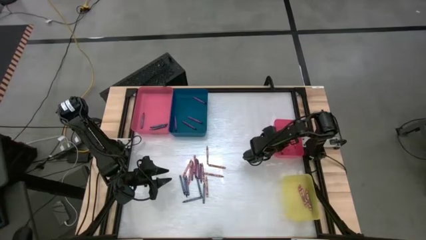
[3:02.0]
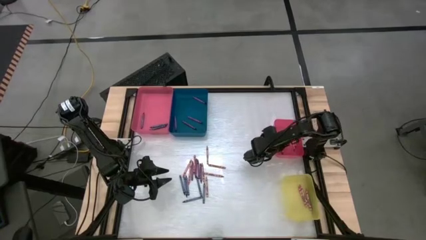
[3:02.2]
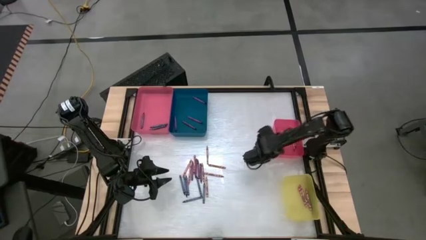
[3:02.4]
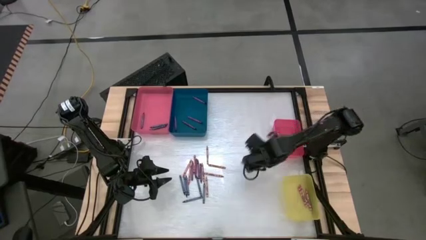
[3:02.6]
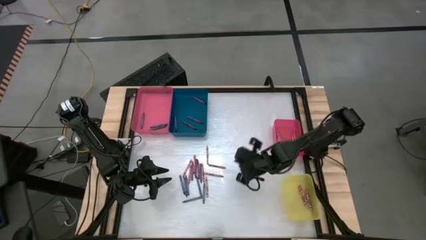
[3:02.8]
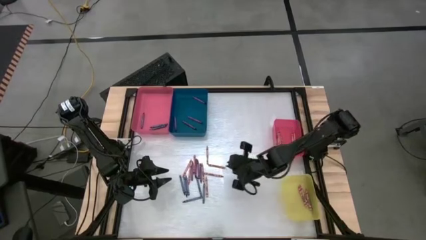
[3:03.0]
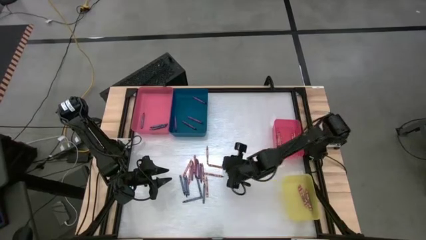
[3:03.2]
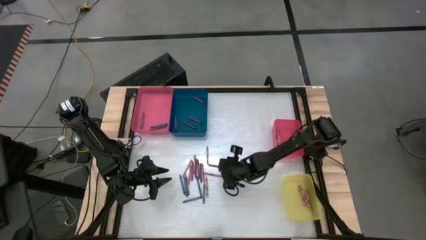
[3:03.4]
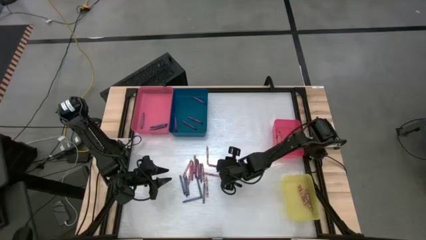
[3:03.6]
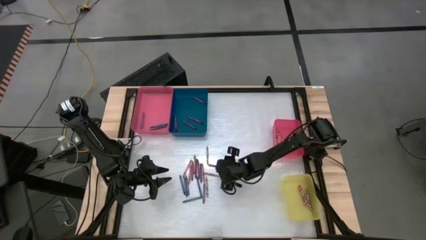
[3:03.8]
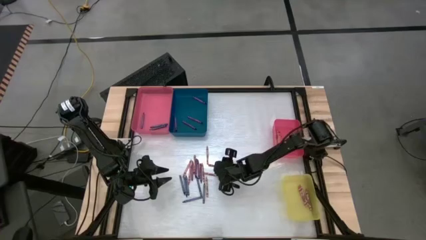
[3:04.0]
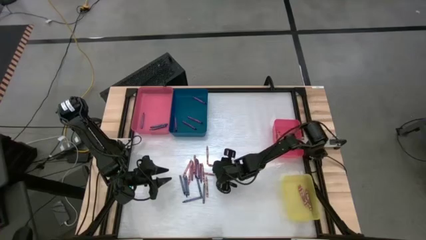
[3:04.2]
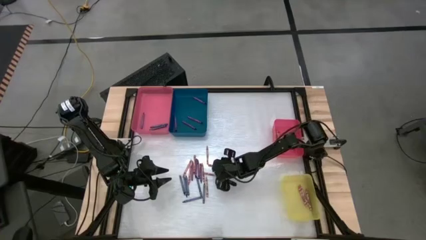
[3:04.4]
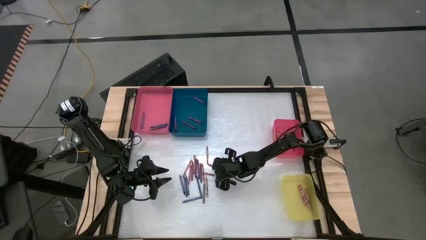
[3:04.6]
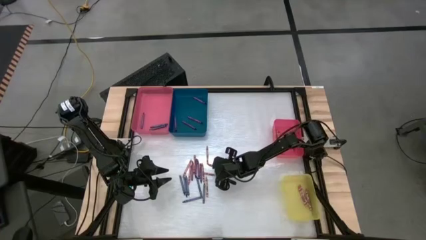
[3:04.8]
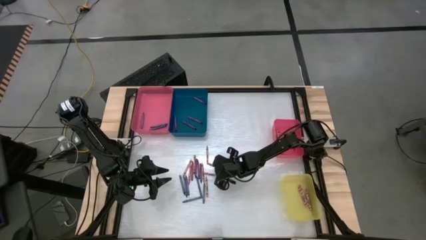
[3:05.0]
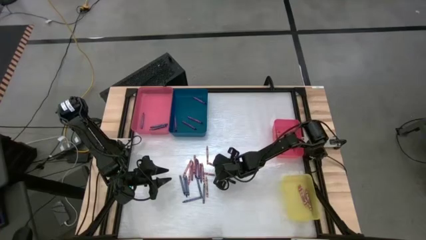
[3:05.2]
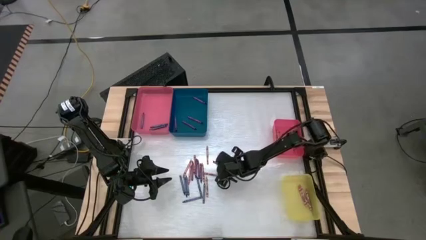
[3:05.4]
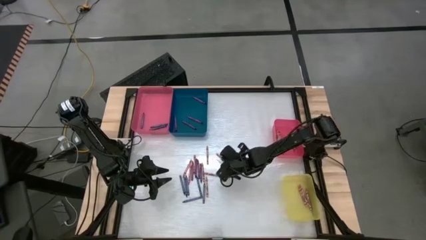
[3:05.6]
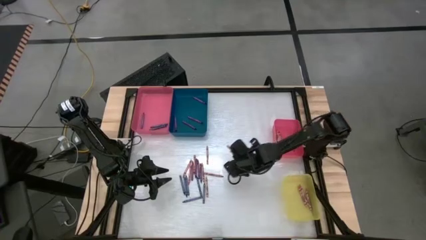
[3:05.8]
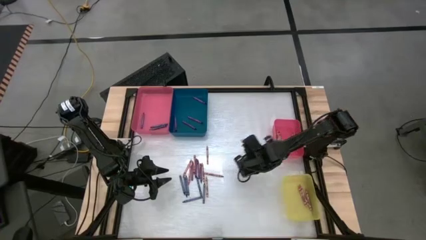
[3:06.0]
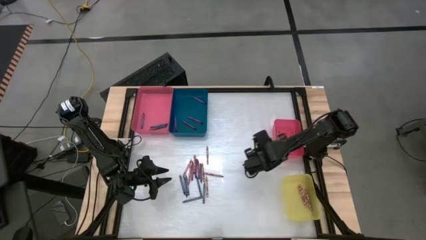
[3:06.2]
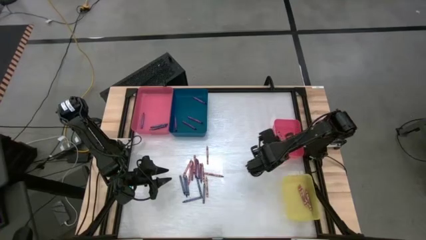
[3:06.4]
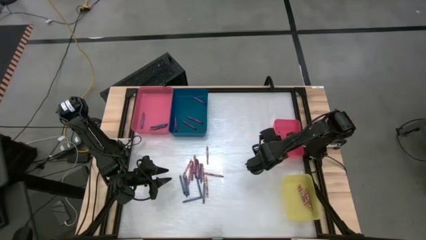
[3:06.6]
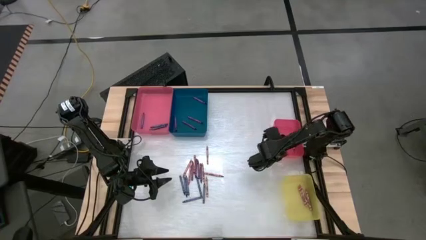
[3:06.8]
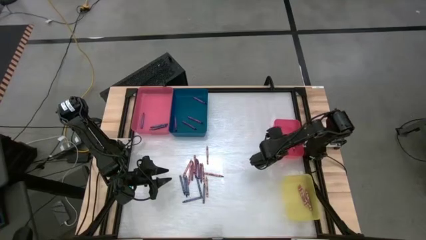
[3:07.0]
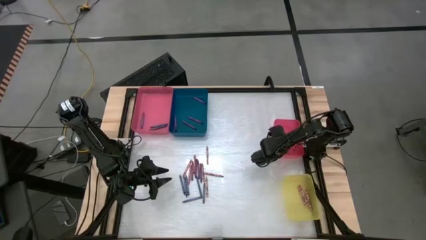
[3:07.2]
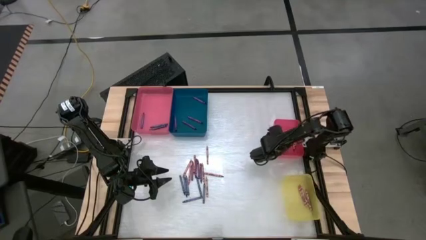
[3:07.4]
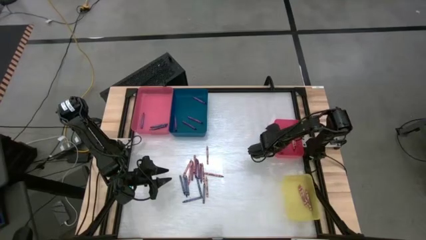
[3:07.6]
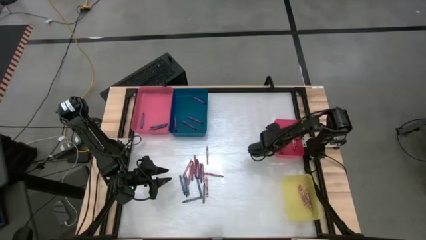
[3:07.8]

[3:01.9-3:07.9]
Task: Sort crayons
Put the red crayon into the small red bin

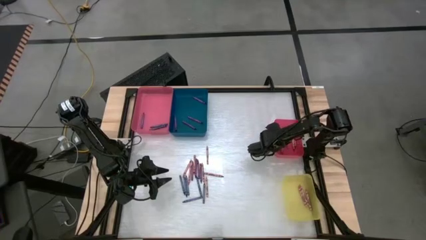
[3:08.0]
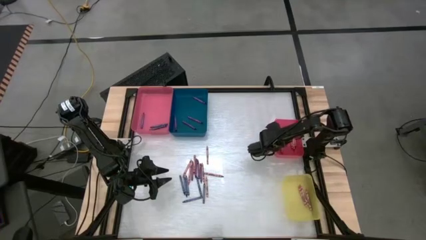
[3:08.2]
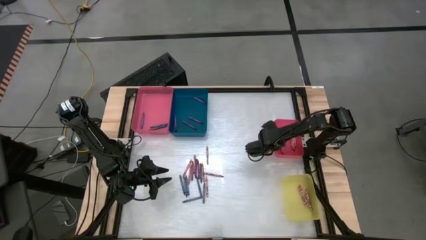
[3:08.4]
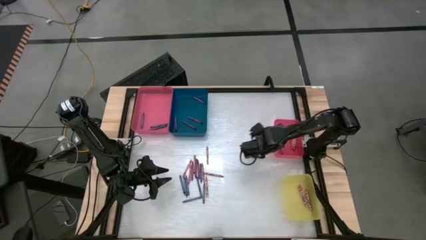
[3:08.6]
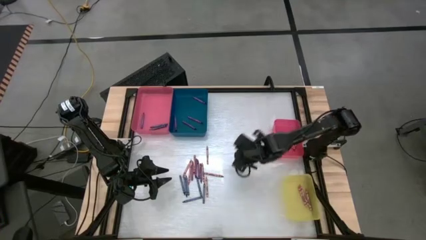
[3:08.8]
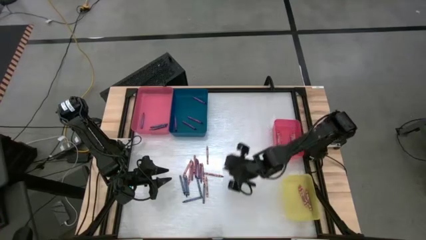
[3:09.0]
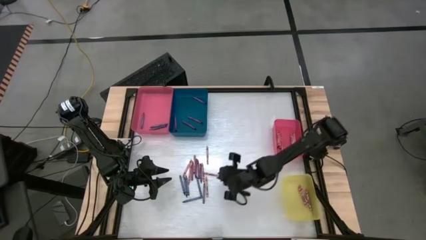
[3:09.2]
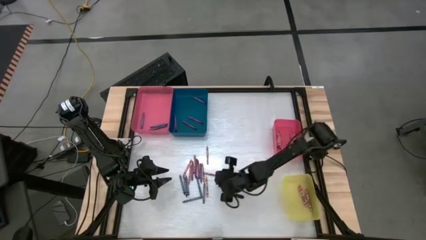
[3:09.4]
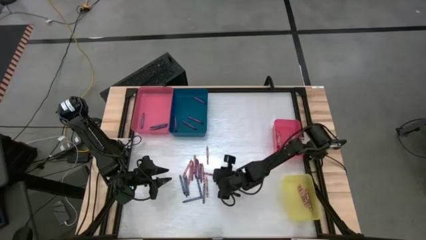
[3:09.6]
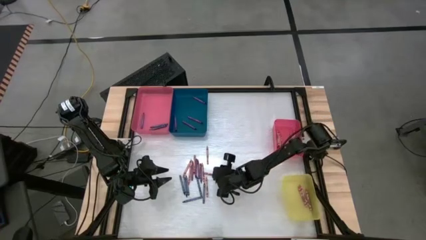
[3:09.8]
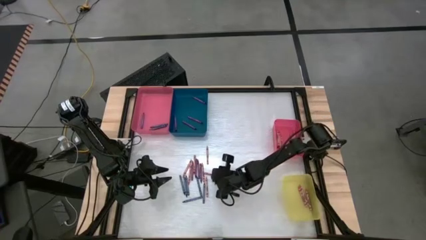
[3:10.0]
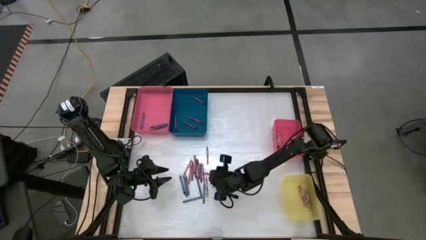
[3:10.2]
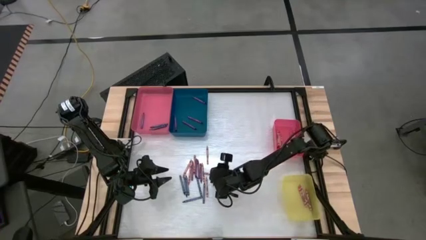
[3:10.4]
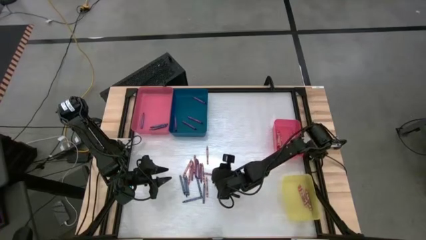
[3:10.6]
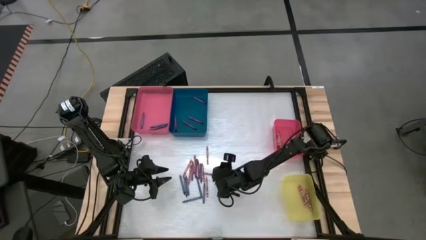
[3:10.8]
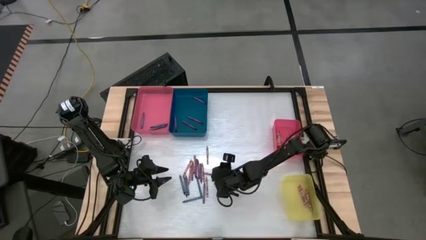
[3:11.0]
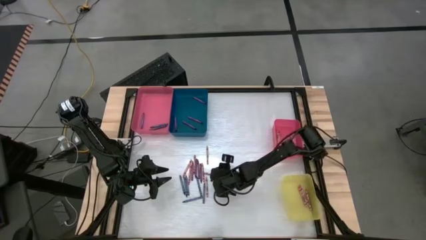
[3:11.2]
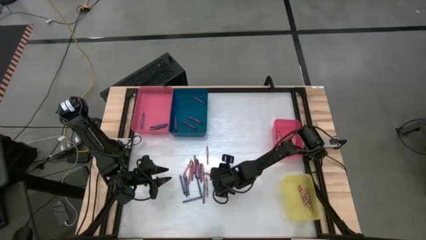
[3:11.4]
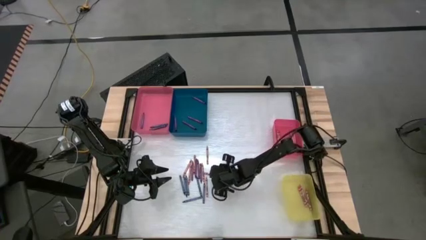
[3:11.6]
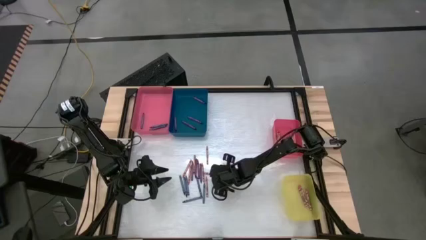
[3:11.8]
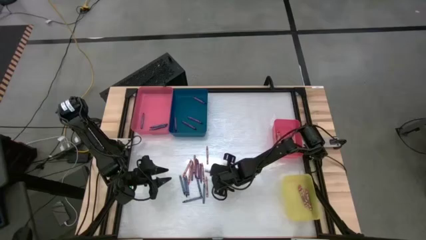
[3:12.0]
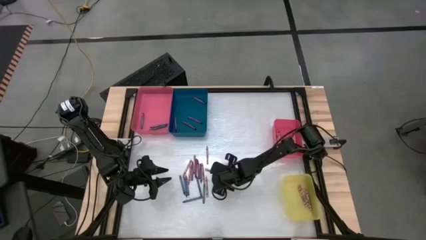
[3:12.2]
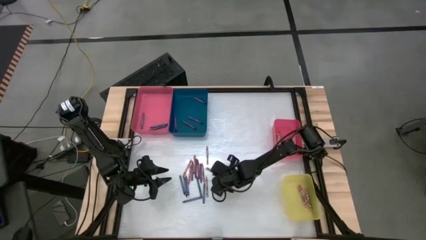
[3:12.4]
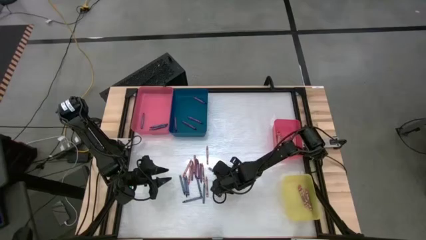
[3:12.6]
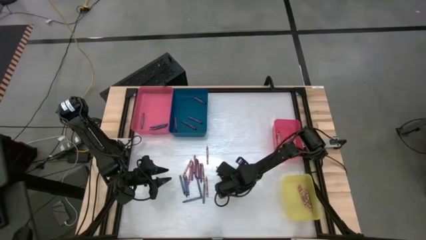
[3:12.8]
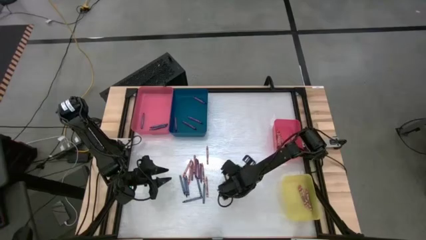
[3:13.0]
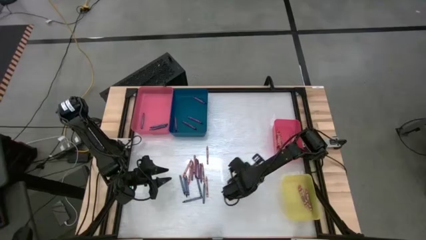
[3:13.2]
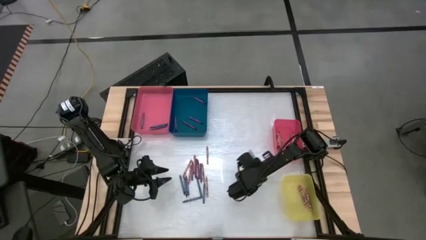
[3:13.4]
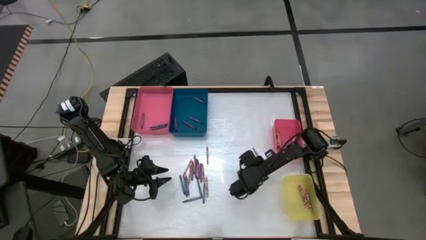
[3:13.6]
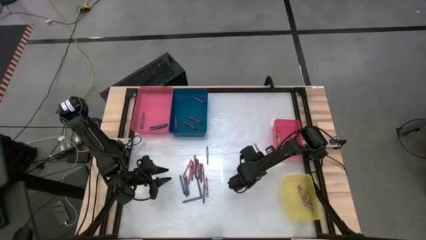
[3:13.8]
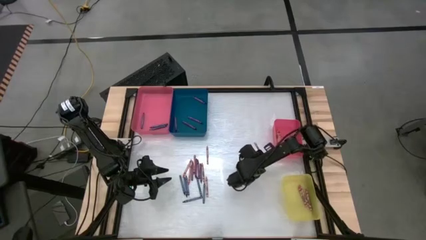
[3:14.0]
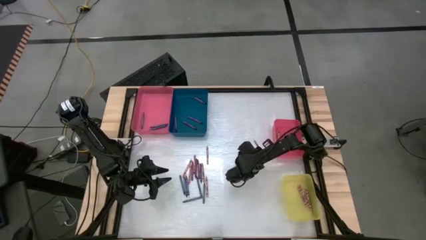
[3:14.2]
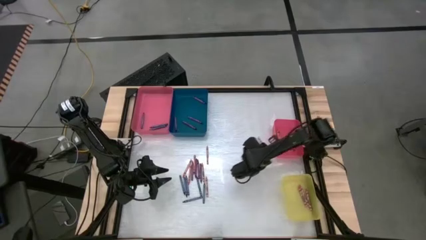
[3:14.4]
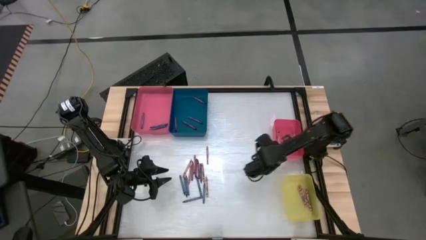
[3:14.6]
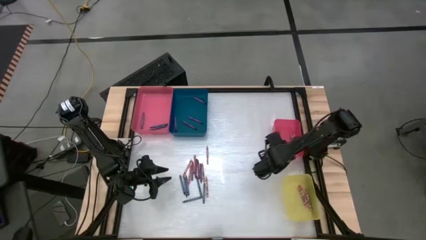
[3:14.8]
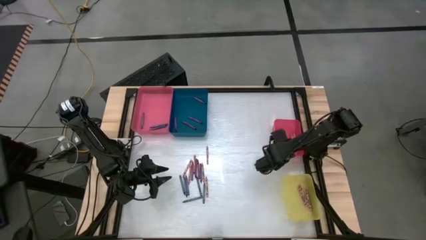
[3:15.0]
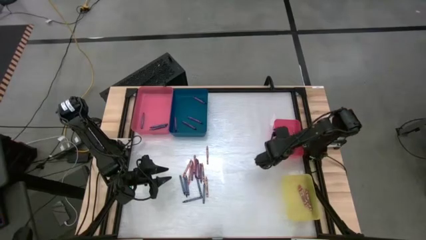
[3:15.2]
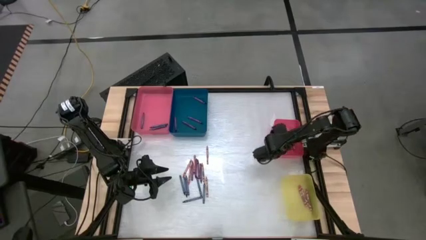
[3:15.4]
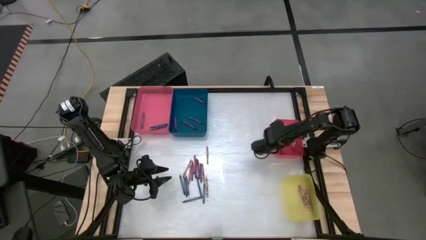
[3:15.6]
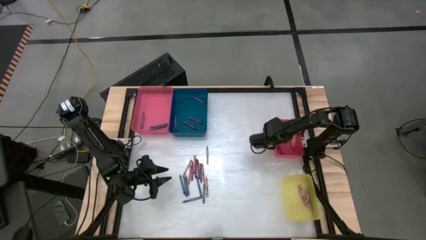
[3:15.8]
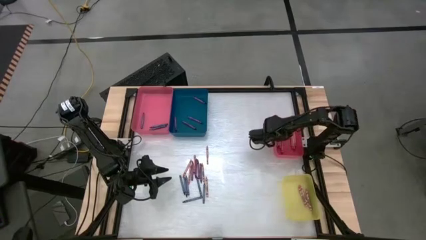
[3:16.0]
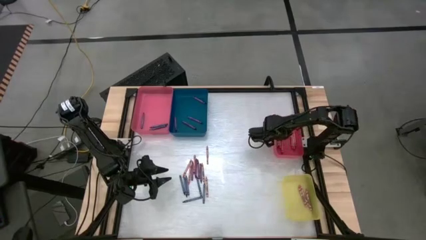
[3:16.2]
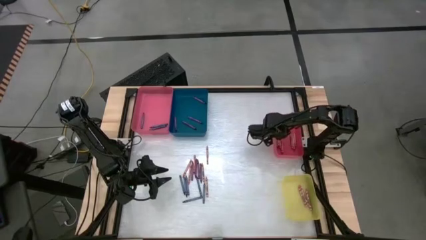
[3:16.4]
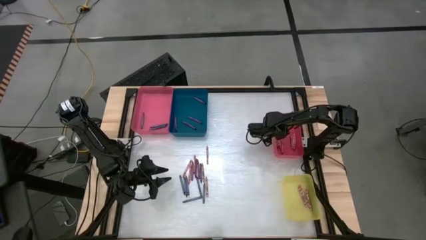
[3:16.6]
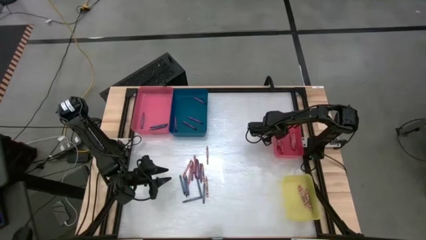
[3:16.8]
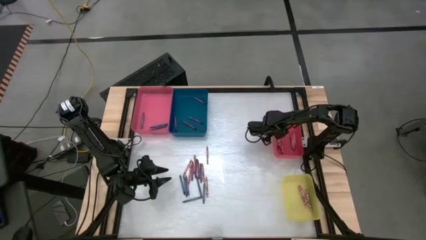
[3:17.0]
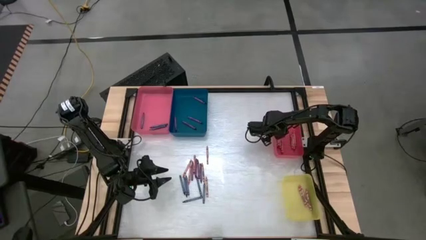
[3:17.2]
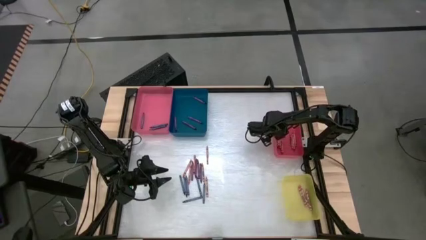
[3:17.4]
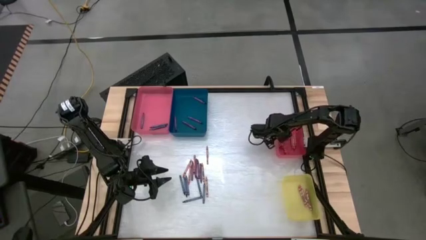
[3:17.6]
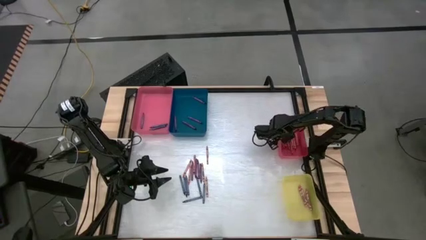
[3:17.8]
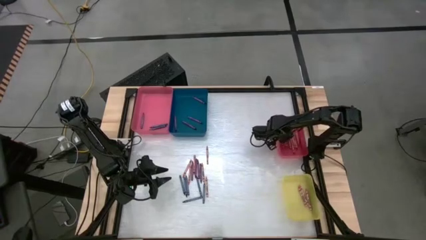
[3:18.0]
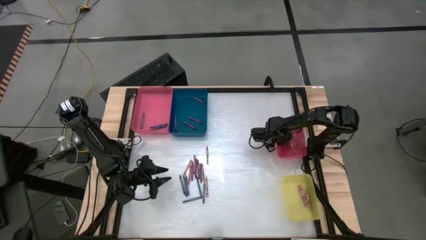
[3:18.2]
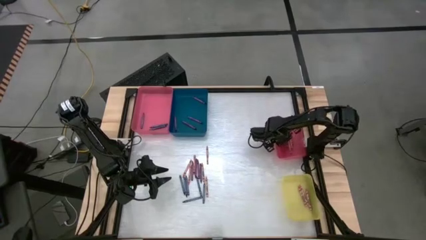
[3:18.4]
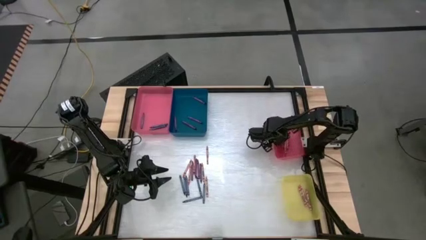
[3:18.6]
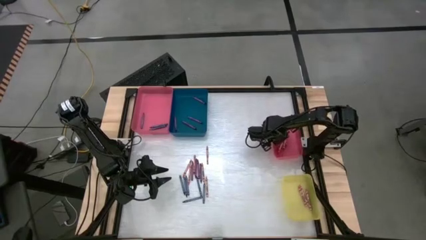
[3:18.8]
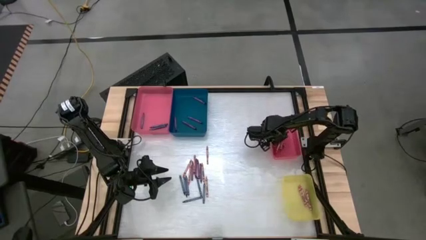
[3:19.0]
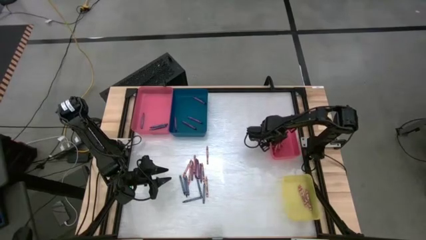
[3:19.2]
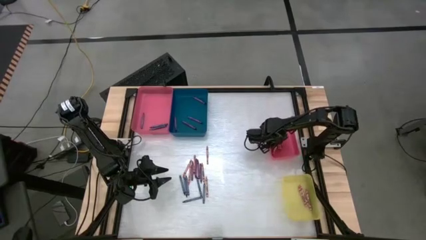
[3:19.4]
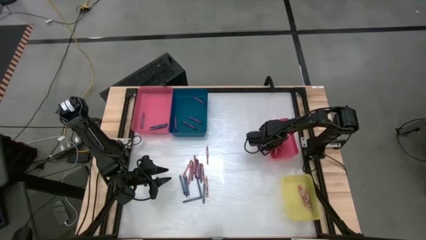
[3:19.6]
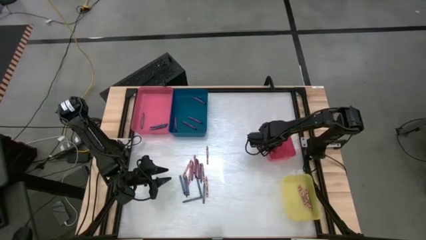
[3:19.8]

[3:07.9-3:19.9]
Put the red crayon into the small red bin
